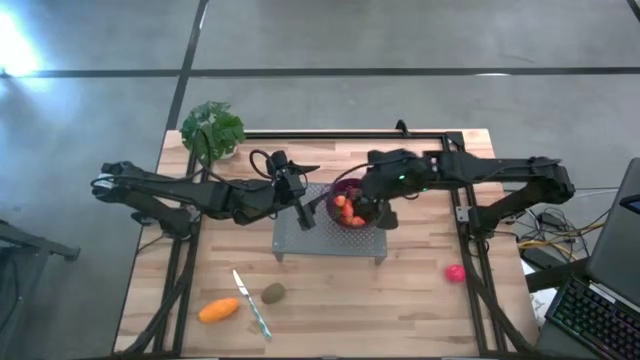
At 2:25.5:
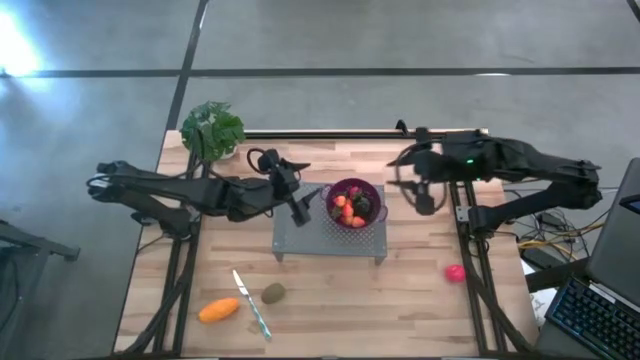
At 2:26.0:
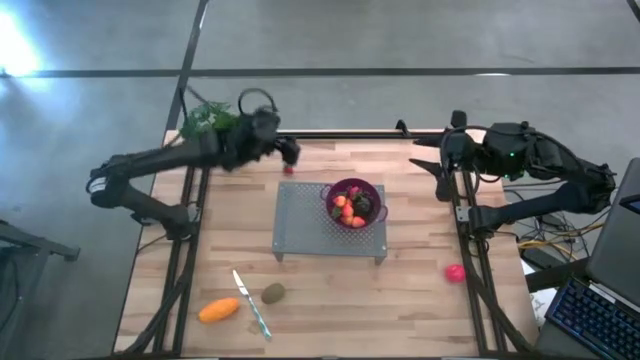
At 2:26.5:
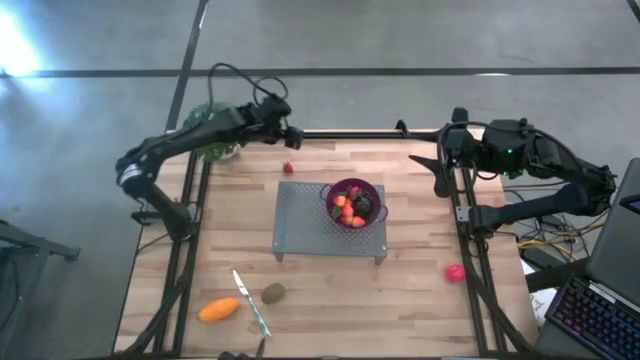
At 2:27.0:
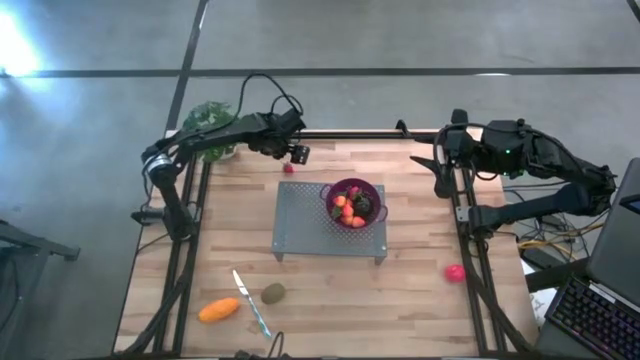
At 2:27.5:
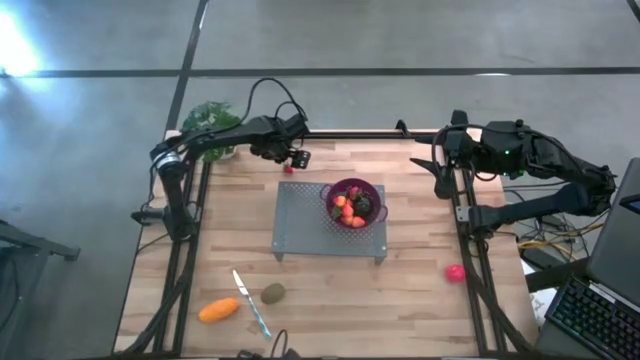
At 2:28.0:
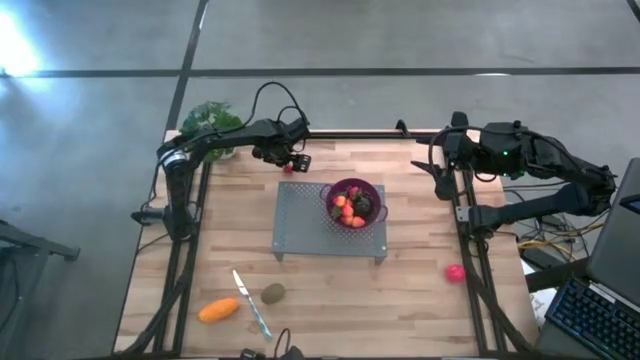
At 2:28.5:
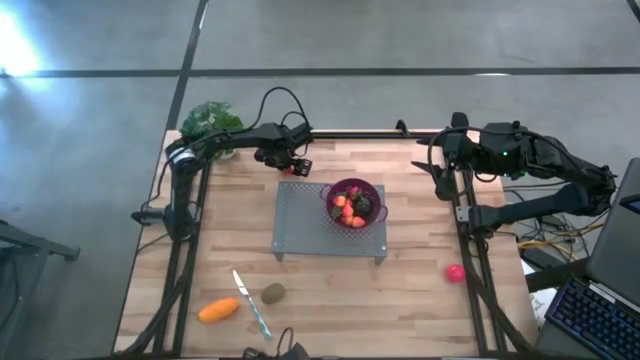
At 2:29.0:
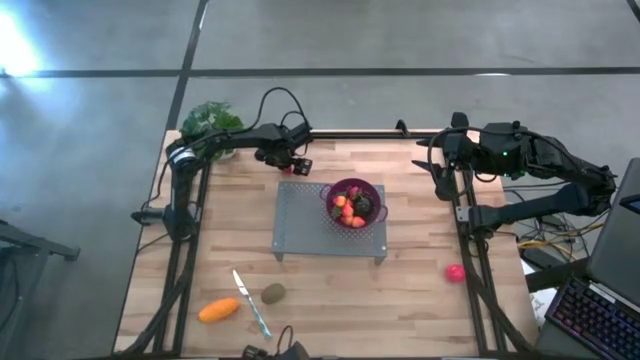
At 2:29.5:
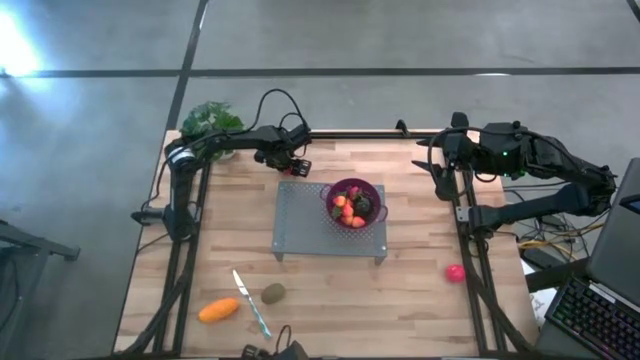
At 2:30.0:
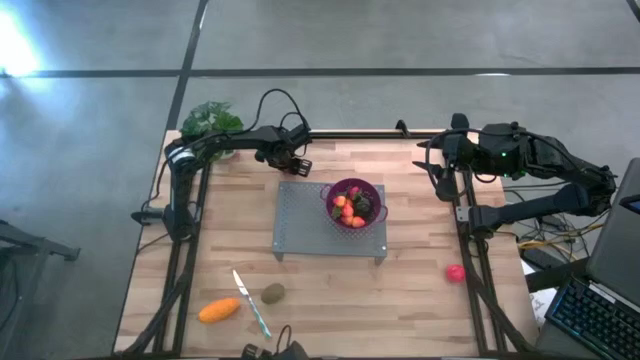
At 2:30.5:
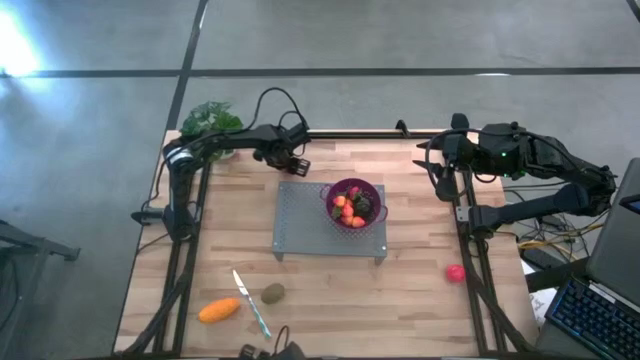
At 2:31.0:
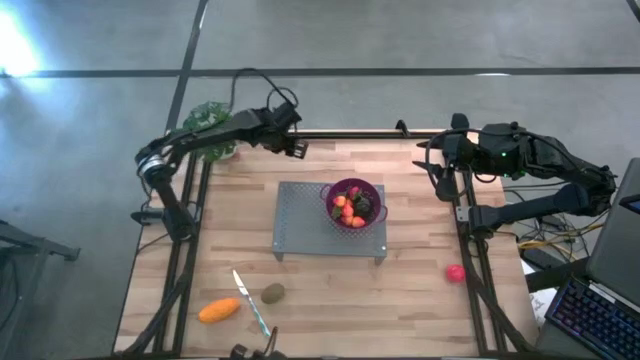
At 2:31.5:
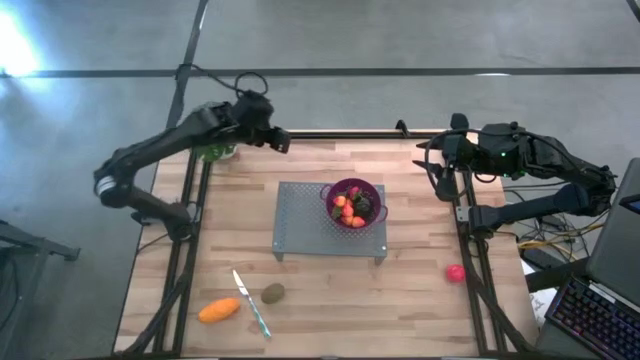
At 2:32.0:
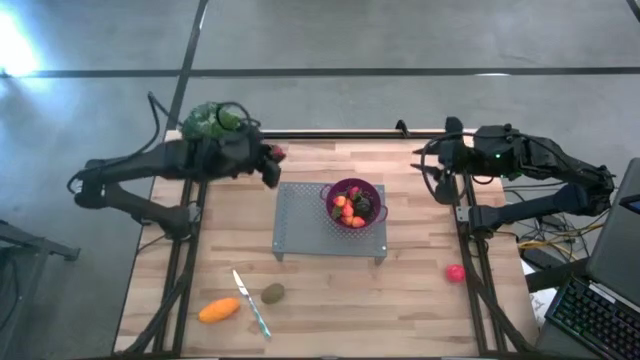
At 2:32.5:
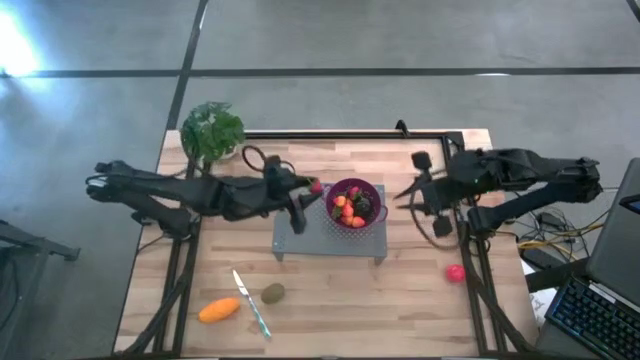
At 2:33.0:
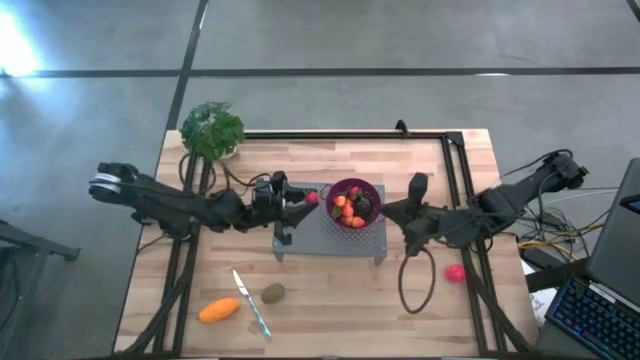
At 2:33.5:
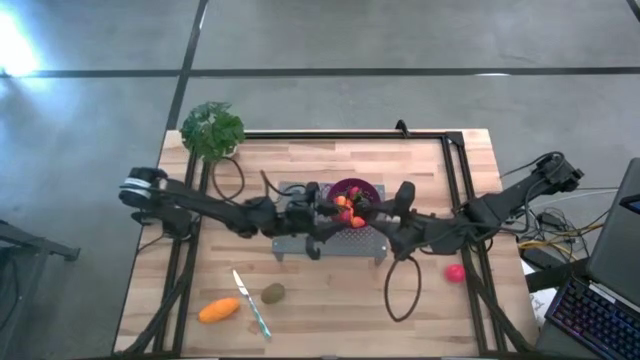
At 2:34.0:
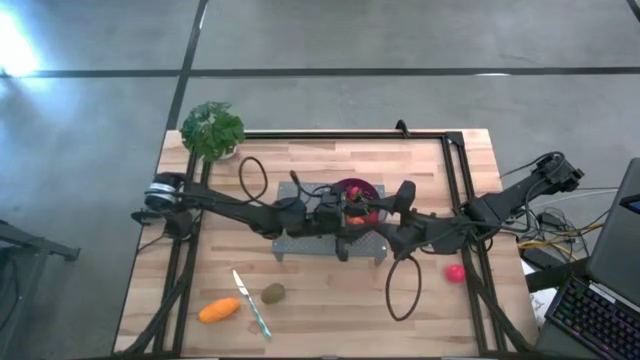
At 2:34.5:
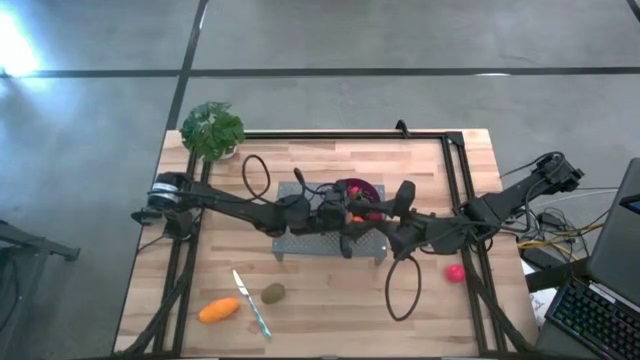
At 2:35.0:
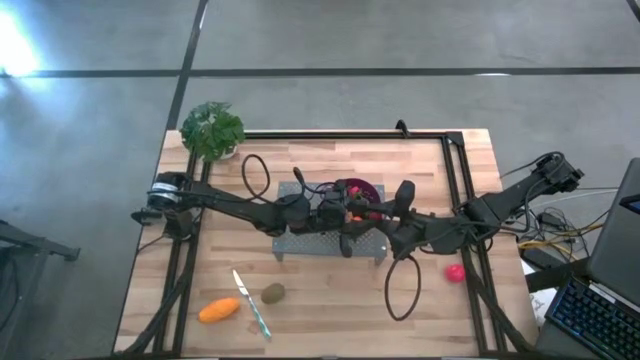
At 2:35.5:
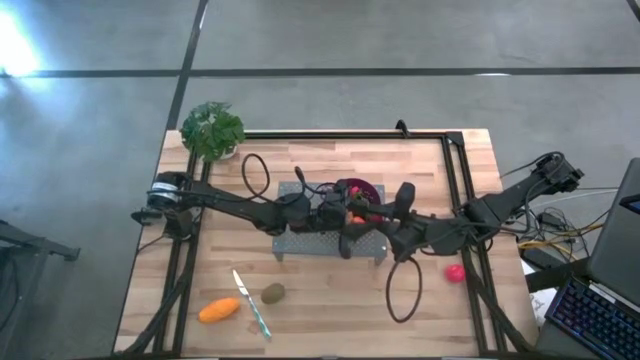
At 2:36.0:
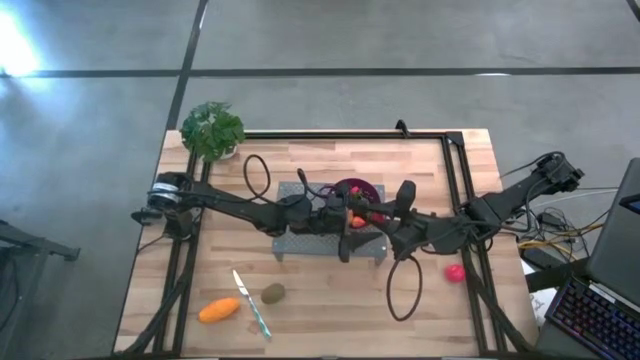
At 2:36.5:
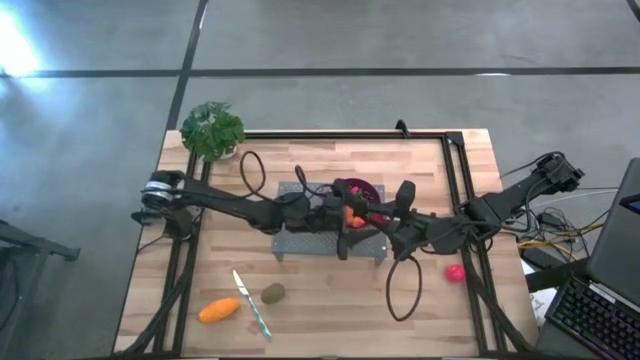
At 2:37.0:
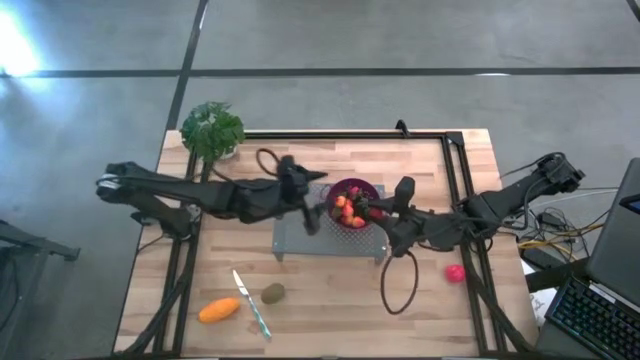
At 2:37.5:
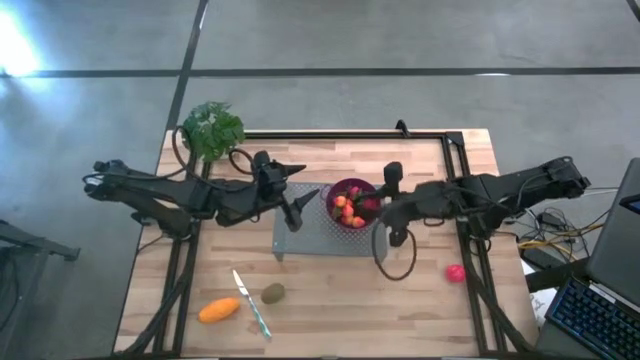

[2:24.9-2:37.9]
Task: Pick & Place Fruit
Put the strawberry in the purple strainer bowl on the shelf

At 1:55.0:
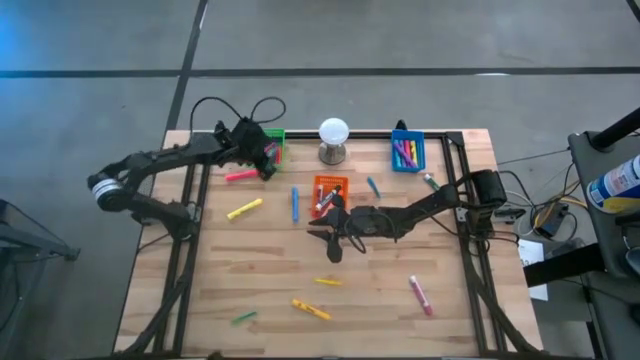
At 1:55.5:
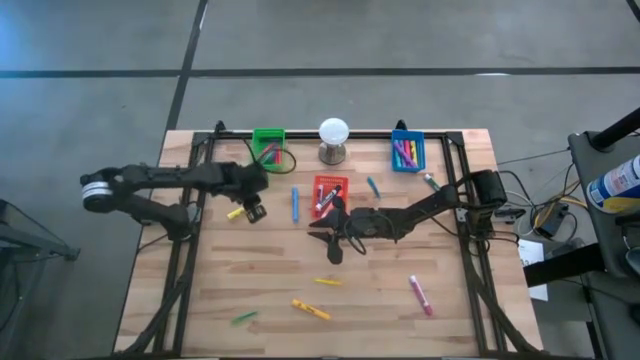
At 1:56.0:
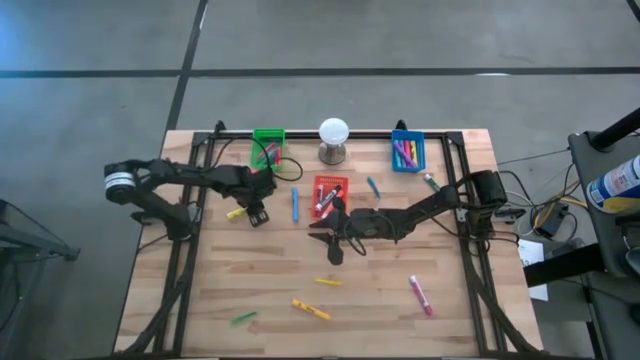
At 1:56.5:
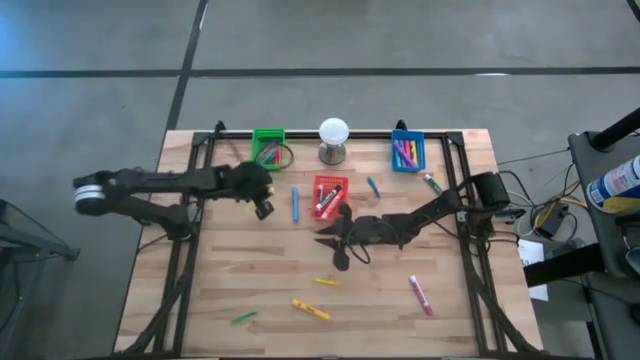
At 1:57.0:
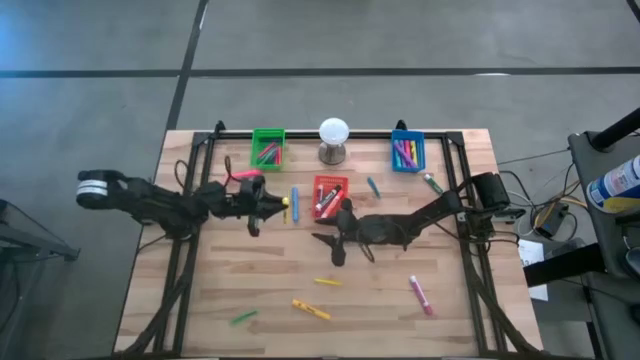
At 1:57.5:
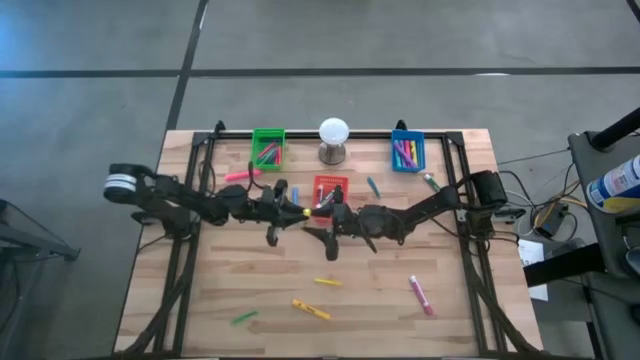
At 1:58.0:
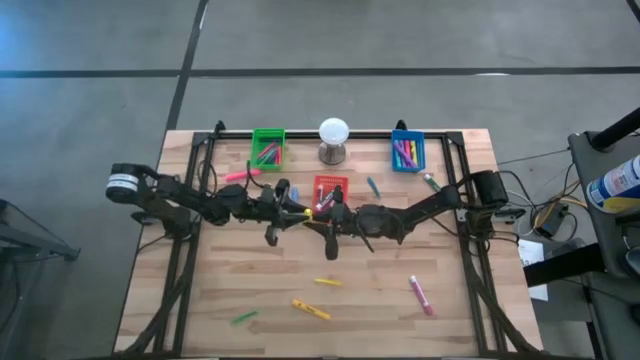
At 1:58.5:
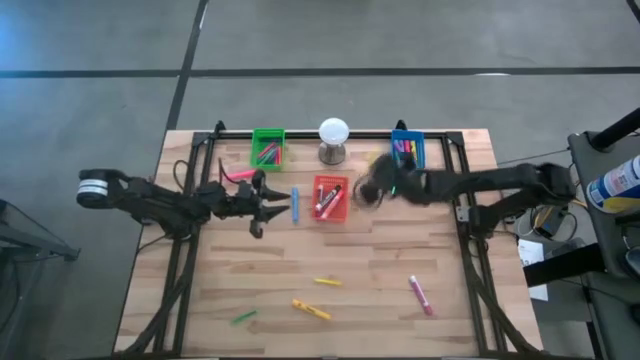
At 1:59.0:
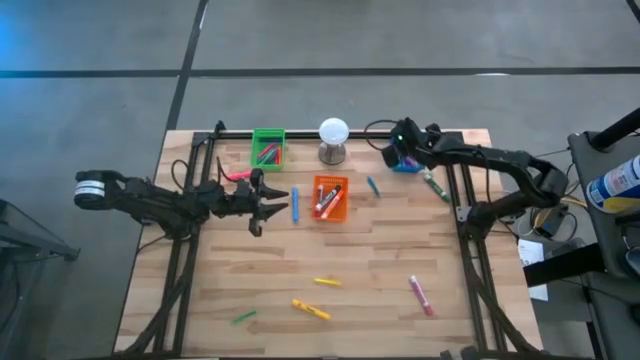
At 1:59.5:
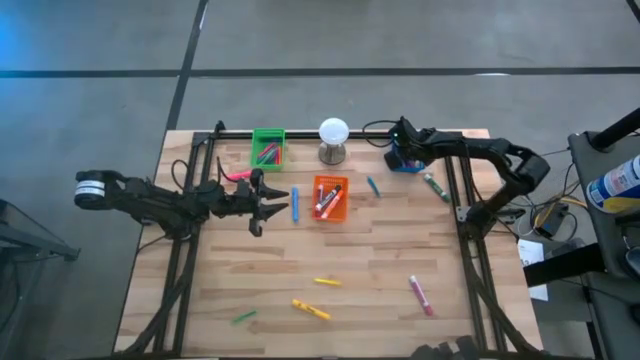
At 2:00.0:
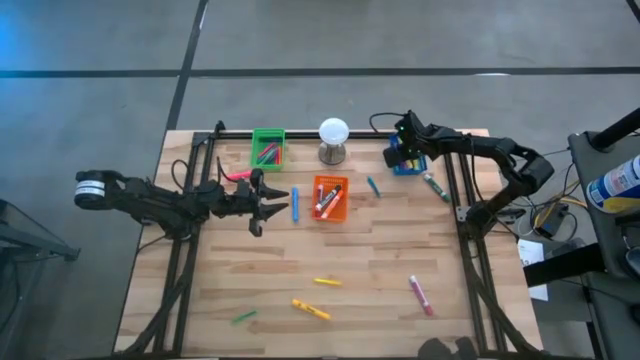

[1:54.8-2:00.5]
Task: Pick & Place Markers
Put the yellow highlighter into the blue bin
